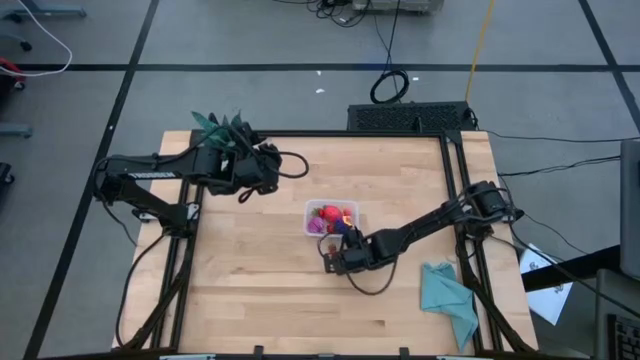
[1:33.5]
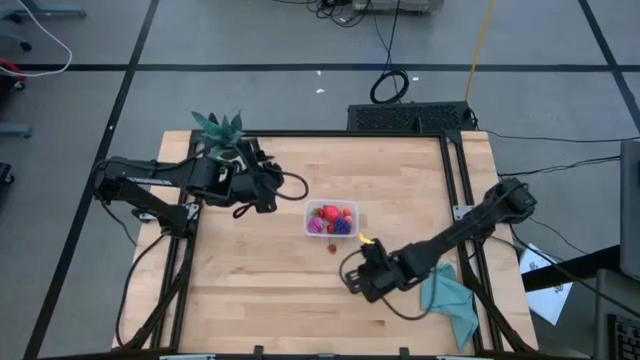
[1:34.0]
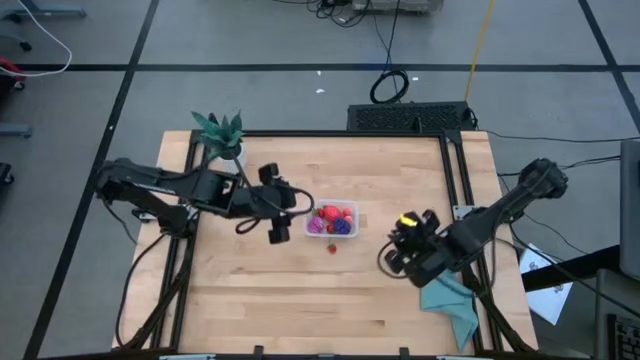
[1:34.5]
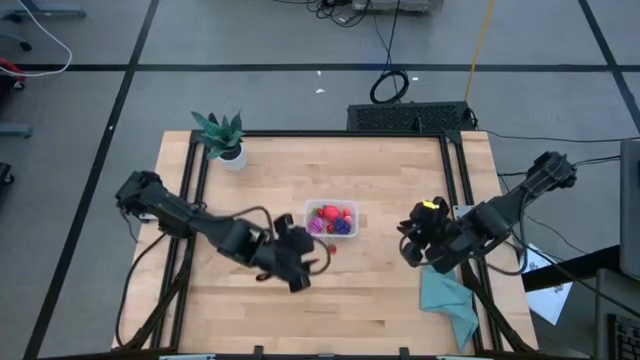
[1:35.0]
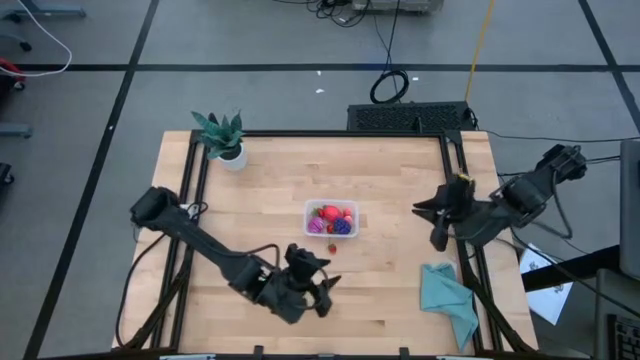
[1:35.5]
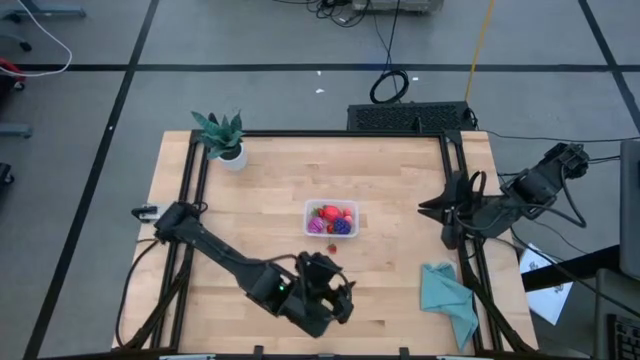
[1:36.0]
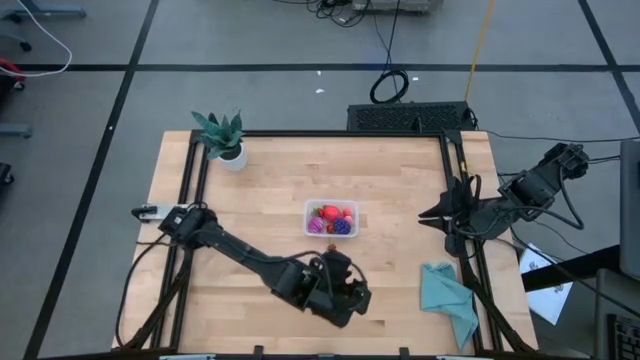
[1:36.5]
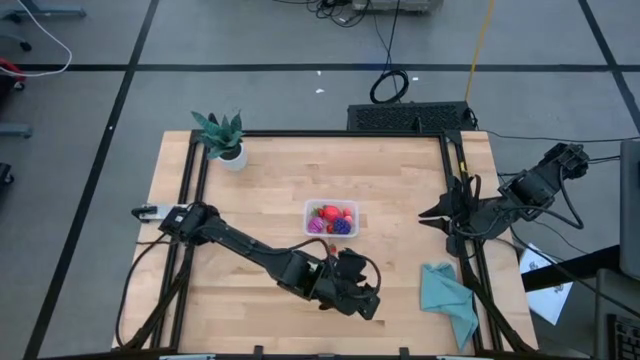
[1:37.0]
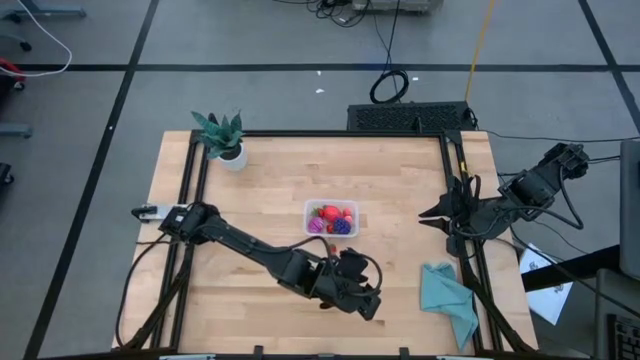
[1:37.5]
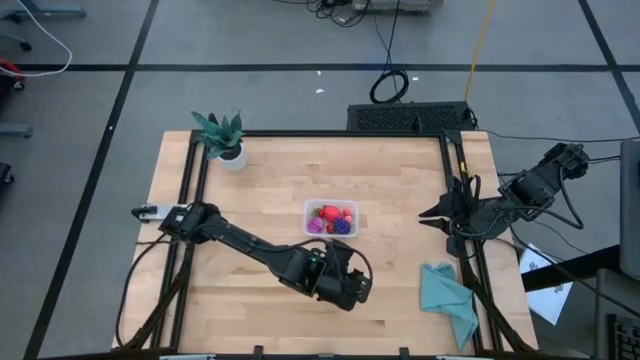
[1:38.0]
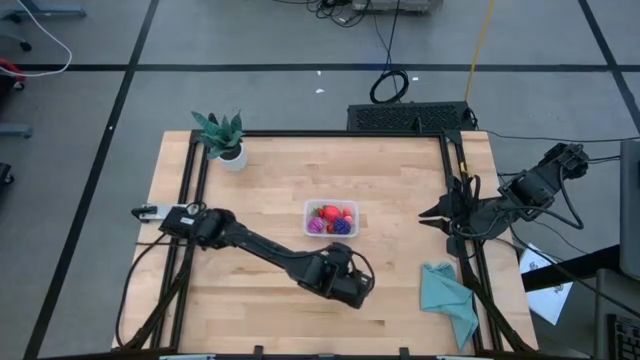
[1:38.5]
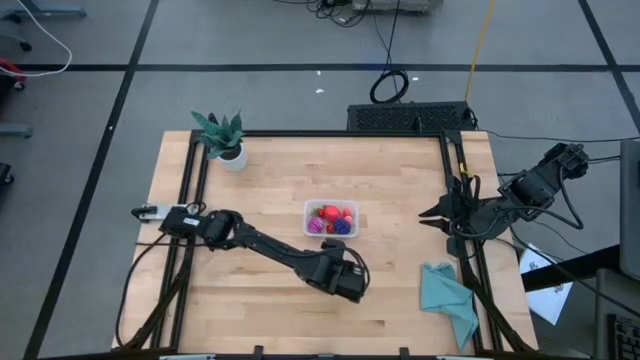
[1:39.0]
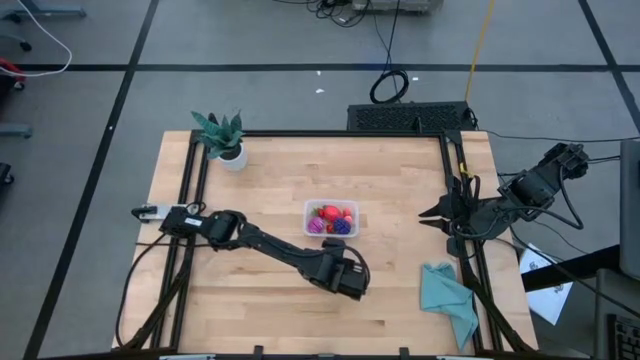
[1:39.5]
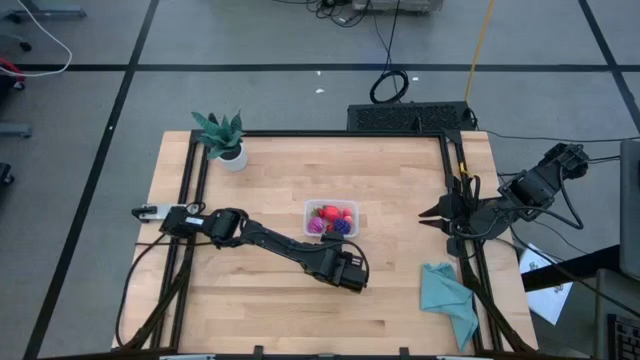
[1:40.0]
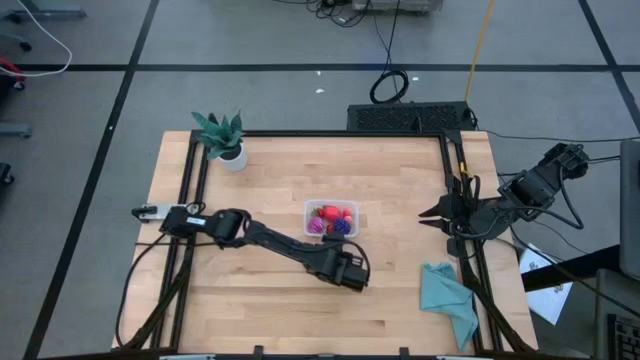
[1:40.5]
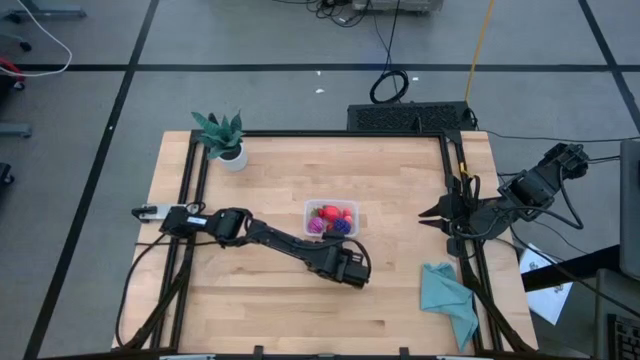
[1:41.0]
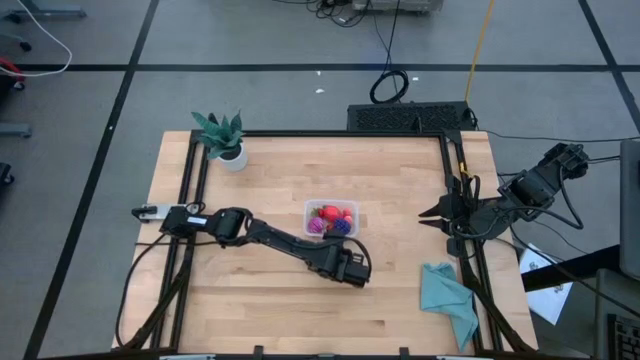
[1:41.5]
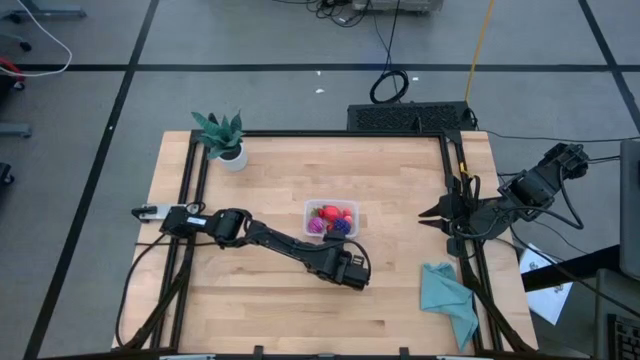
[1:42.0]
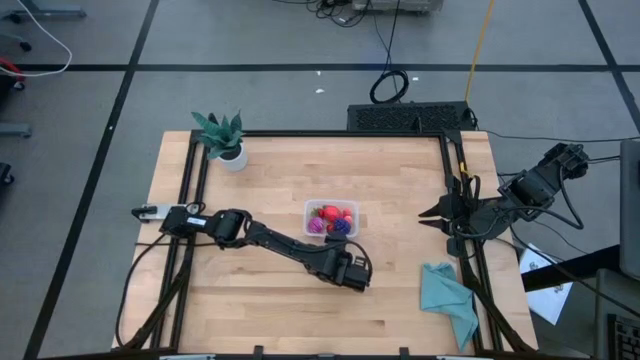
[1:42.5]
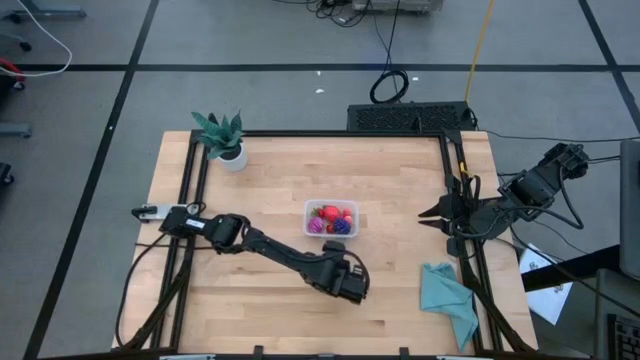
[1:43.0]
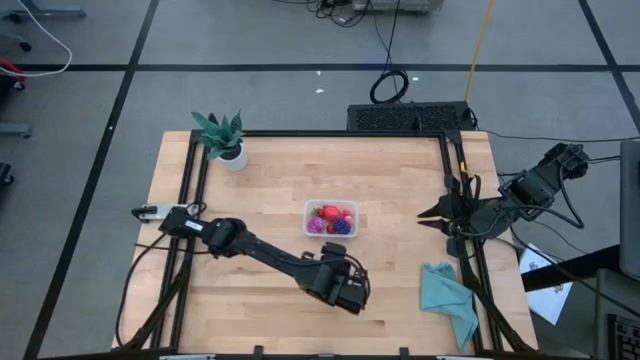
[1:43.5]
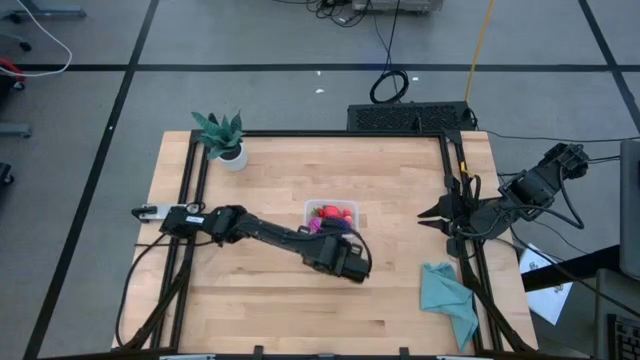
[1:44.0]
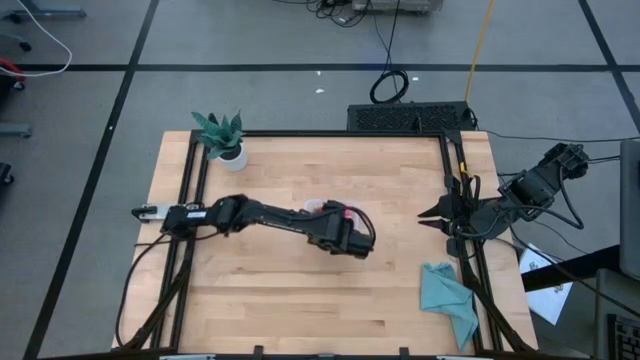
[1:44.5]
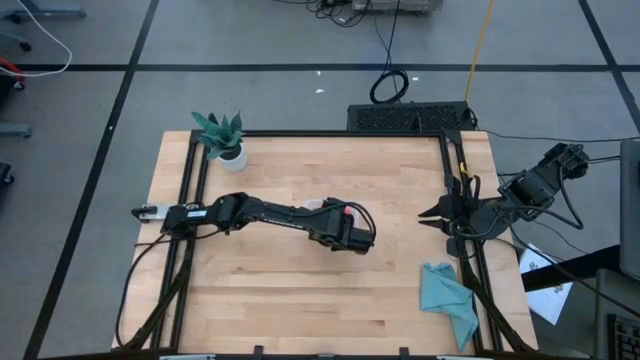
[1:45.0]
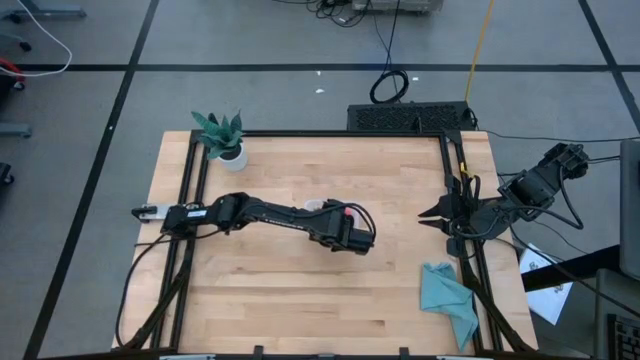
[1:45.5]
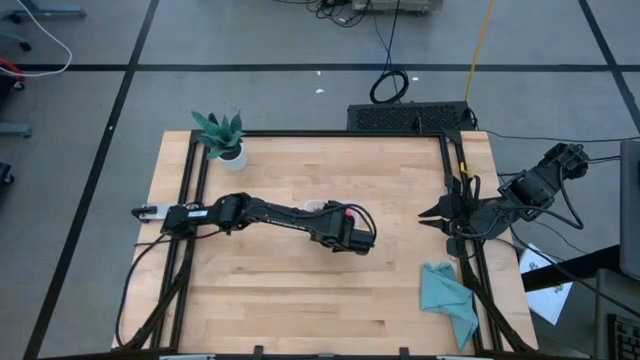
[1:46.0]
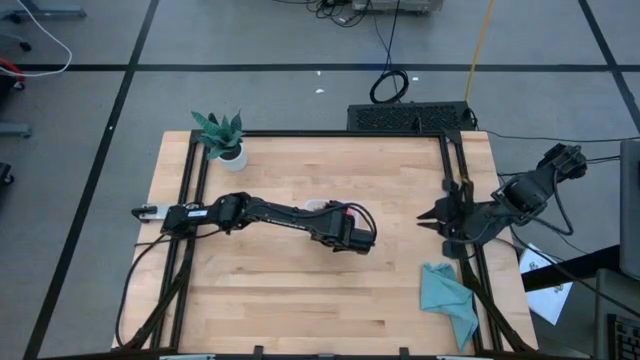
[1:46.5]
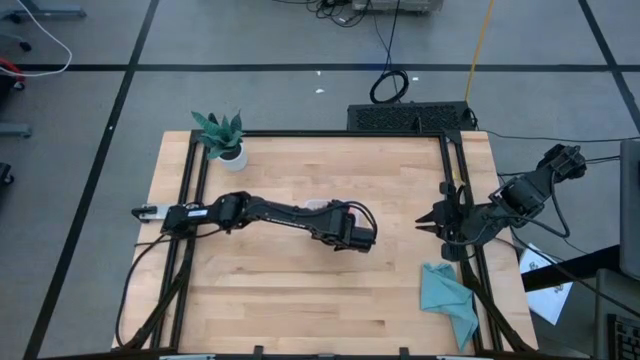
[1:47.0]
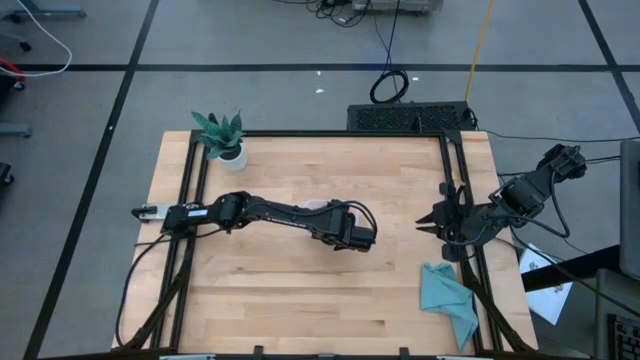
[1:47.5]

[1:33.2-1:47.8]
Task: Pick and placing Produce into tupperware
Put the red strawberry into the transparent bin

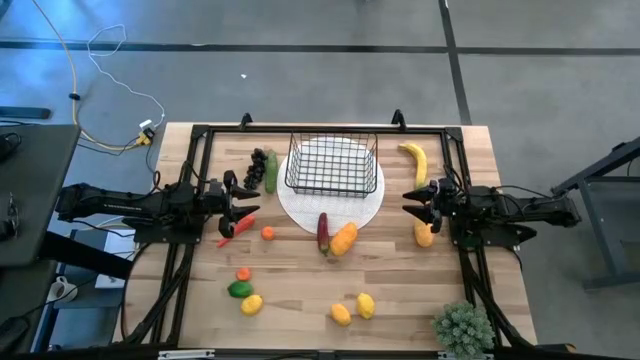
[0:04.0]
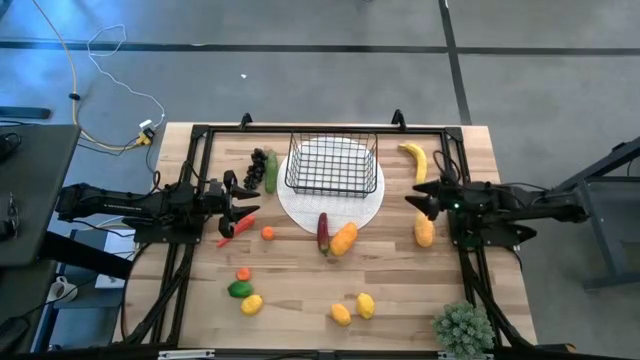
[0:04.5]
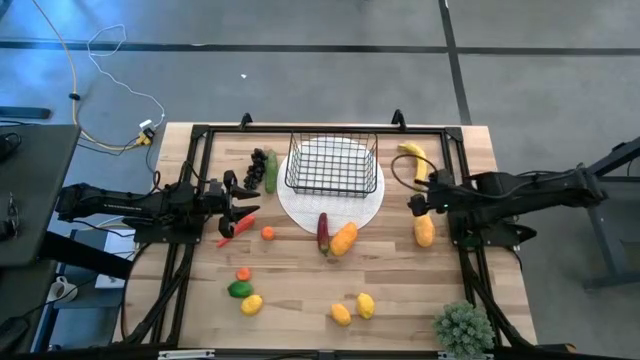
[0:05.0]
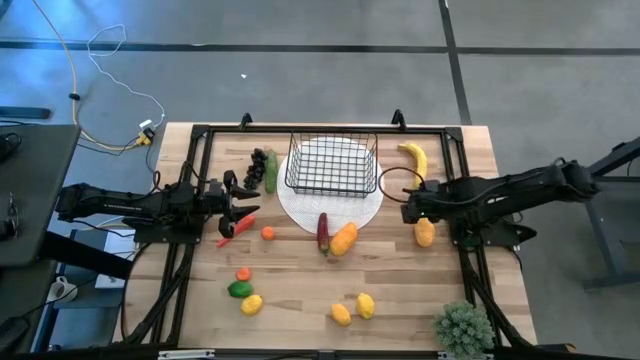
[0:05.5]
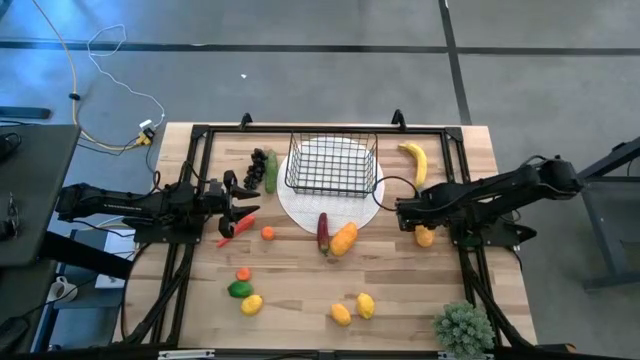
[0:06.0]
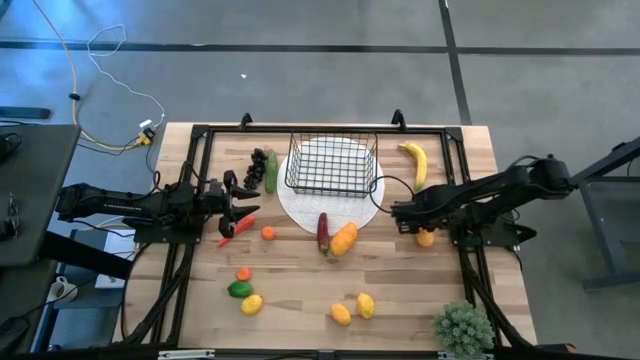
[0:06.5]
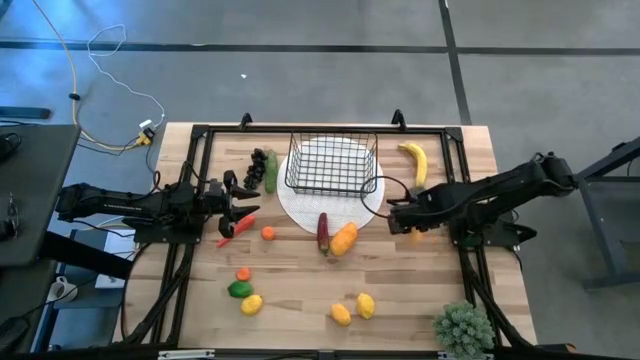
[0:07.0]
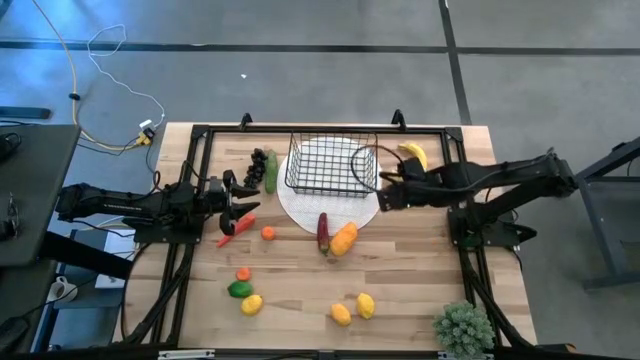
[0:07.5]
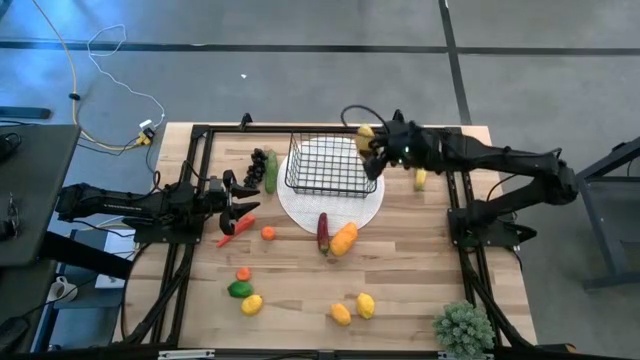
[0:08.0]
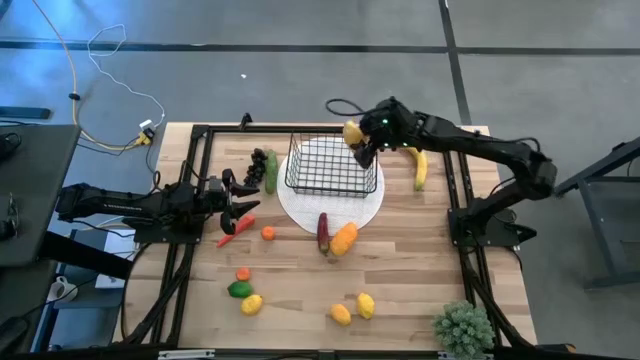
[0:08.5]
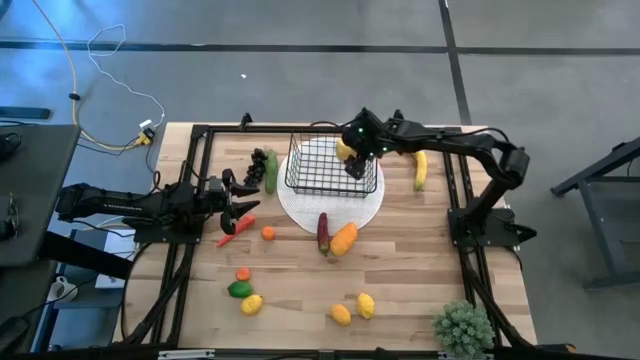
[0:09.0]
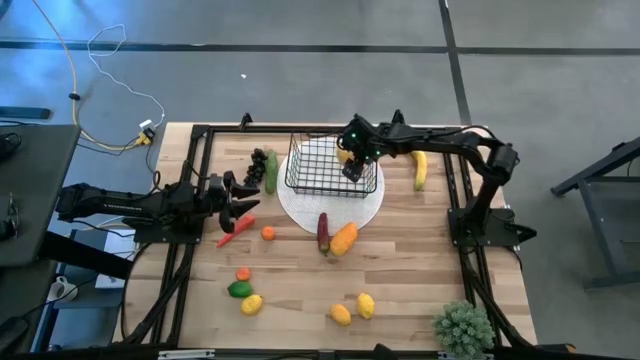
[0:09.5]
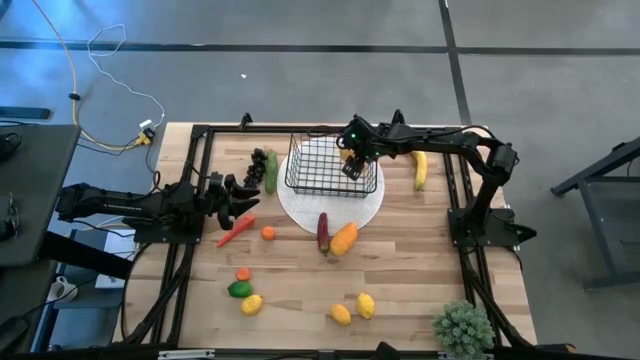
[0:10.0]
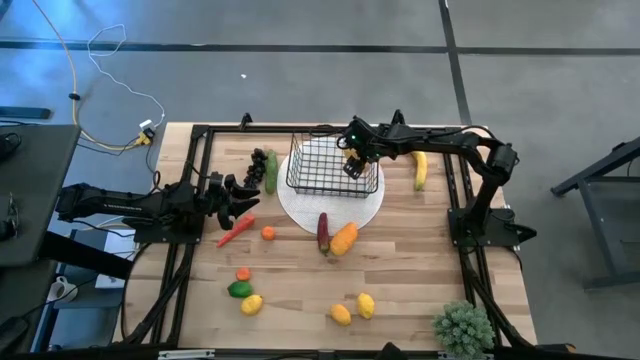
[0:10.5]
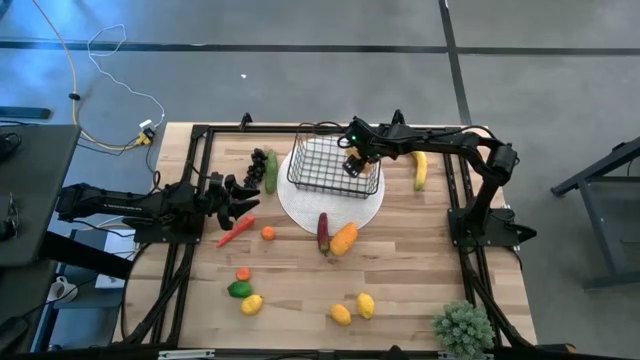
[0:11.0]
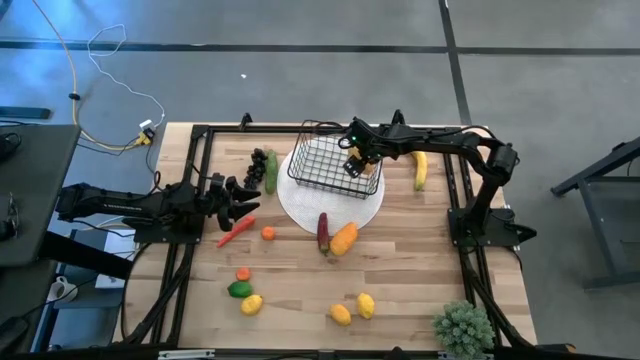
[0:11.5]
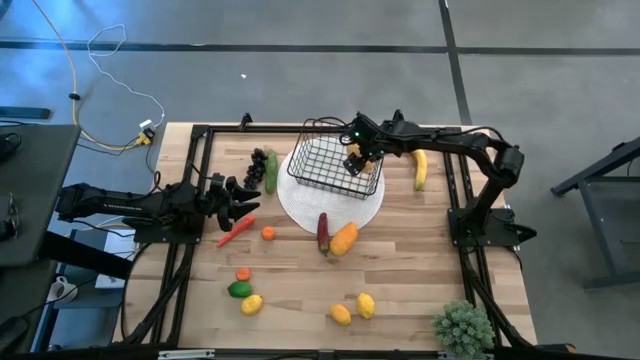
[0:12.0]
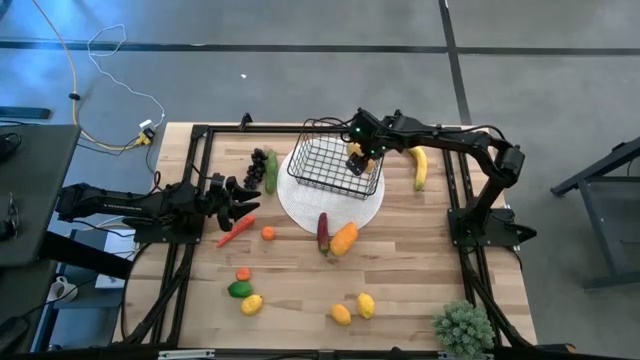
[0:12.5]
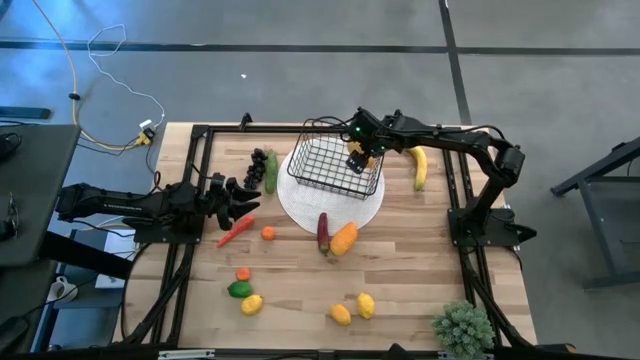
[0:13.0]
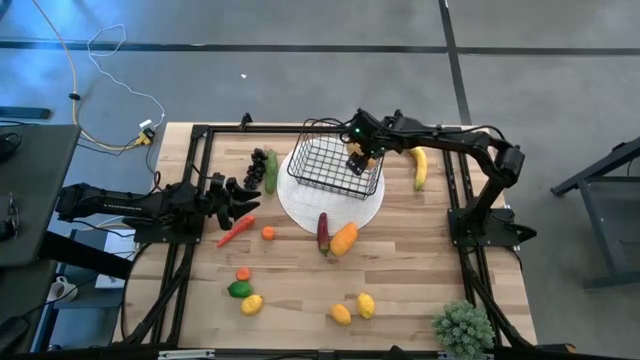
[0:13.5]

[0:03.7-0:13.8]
Task: Build produce basket
Put the right mango into the wire basket
